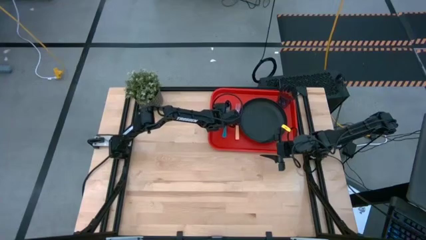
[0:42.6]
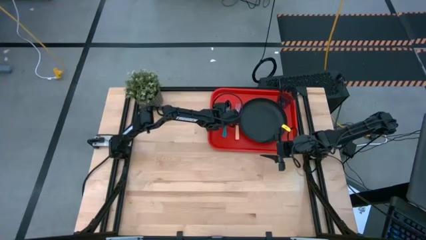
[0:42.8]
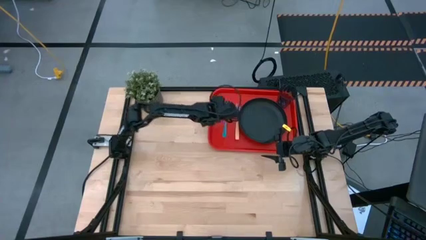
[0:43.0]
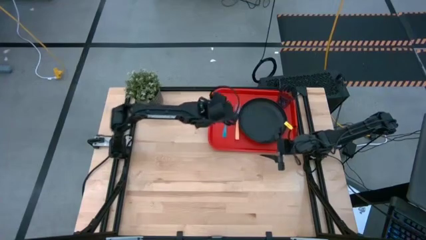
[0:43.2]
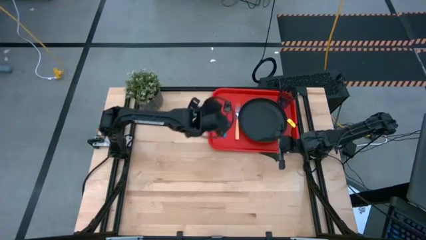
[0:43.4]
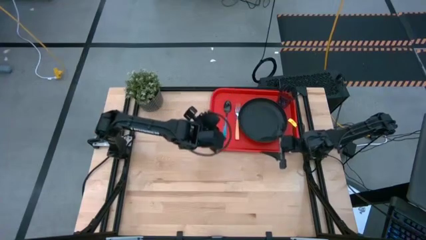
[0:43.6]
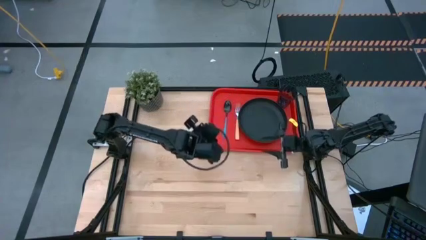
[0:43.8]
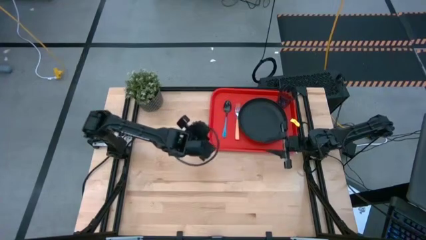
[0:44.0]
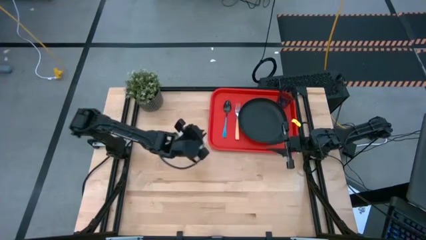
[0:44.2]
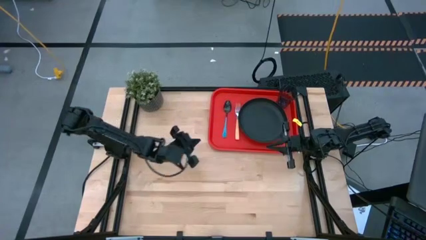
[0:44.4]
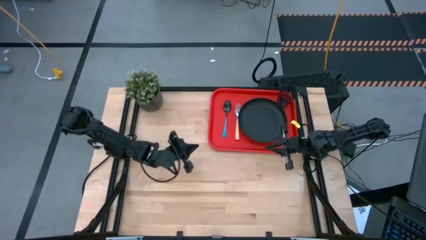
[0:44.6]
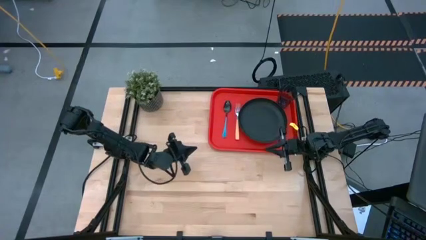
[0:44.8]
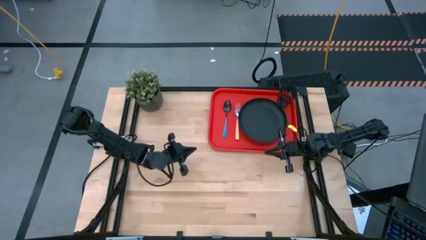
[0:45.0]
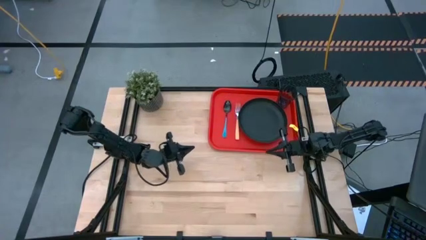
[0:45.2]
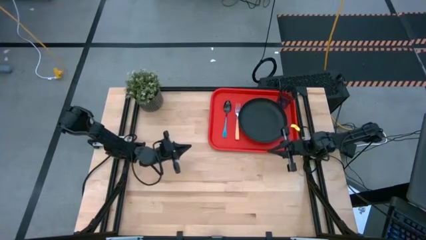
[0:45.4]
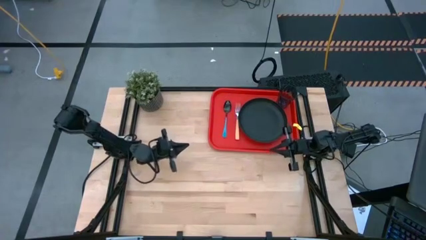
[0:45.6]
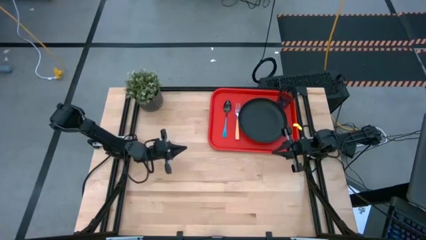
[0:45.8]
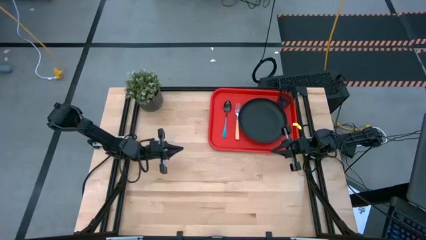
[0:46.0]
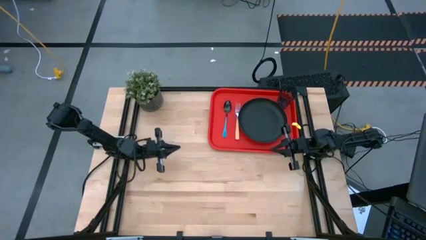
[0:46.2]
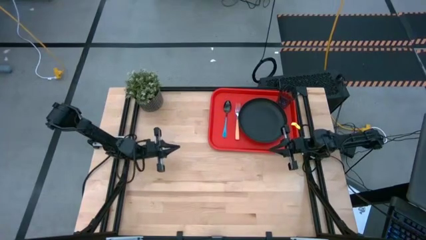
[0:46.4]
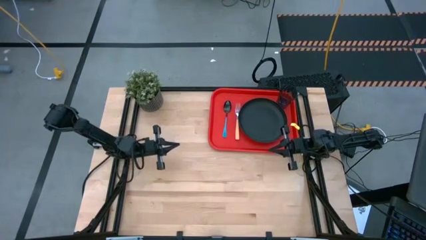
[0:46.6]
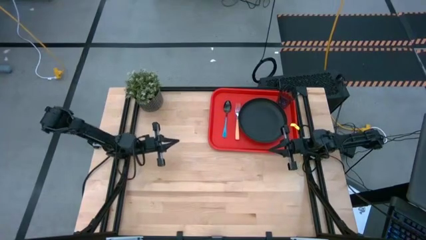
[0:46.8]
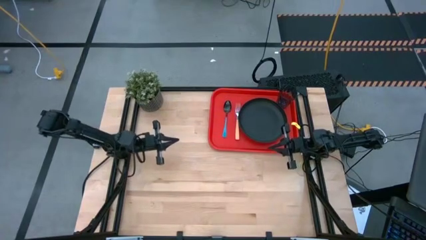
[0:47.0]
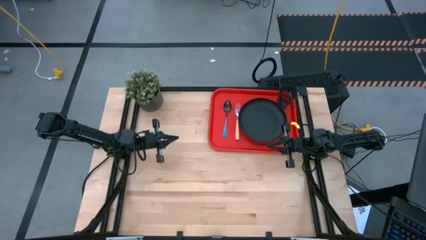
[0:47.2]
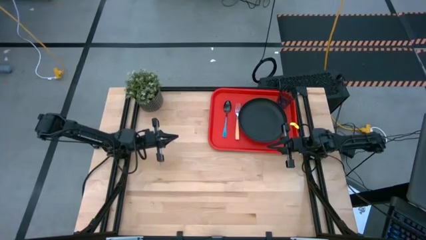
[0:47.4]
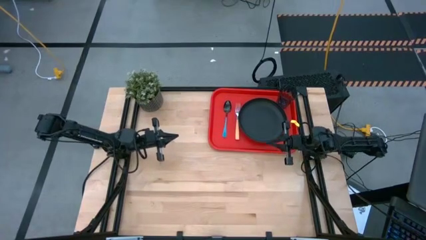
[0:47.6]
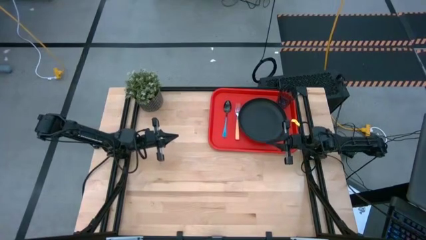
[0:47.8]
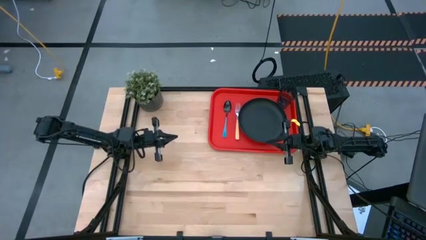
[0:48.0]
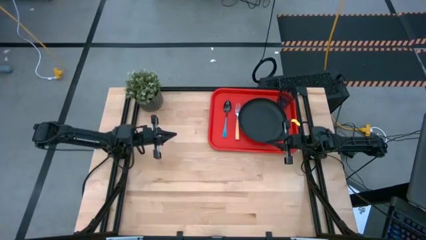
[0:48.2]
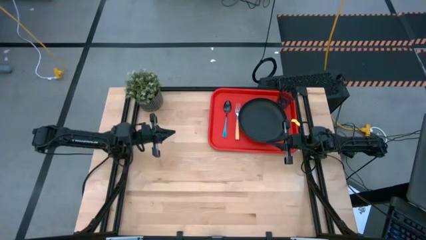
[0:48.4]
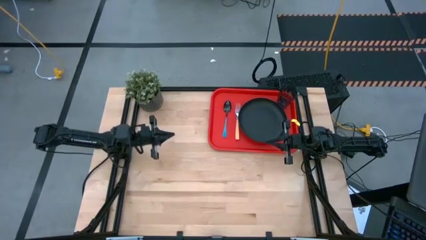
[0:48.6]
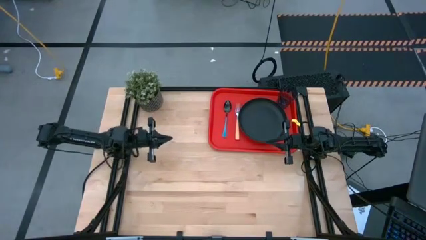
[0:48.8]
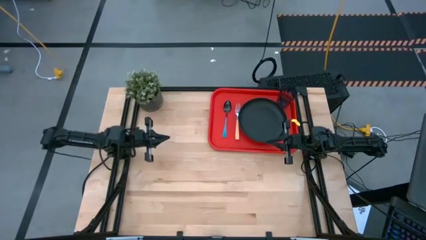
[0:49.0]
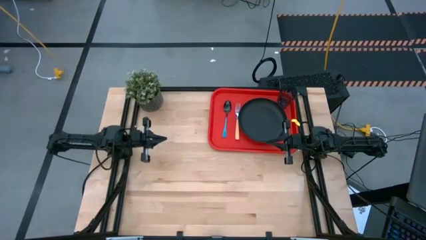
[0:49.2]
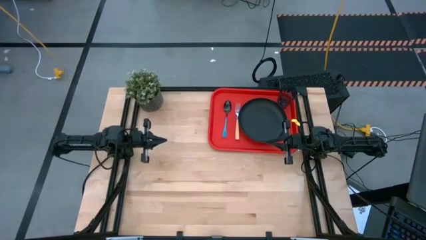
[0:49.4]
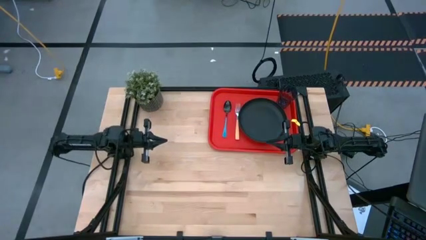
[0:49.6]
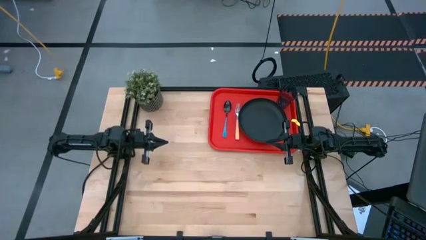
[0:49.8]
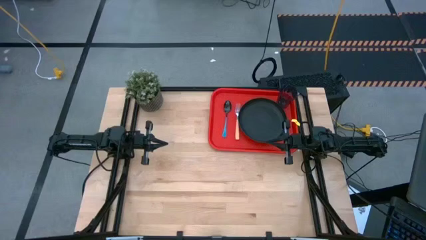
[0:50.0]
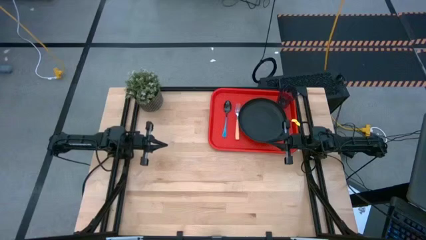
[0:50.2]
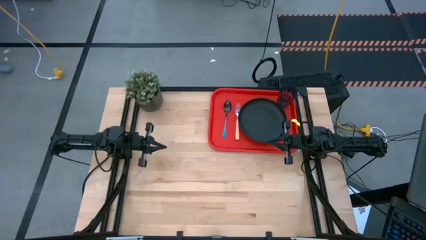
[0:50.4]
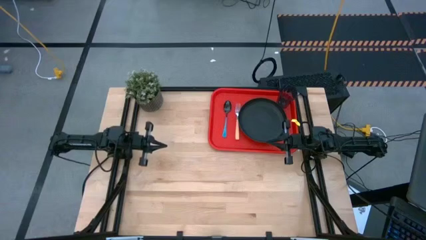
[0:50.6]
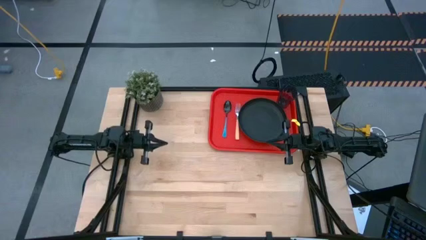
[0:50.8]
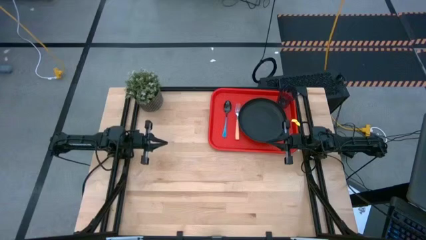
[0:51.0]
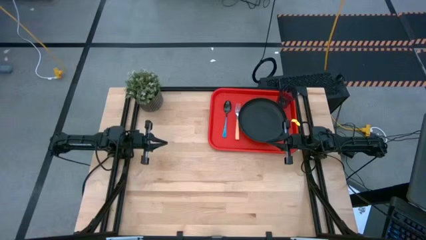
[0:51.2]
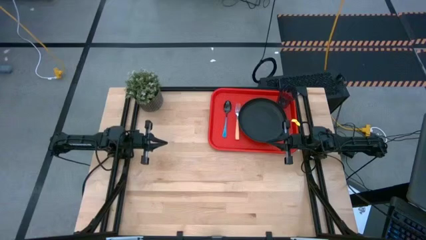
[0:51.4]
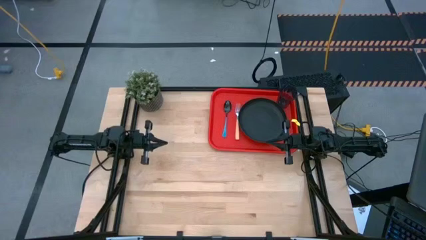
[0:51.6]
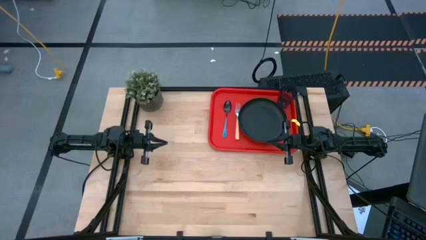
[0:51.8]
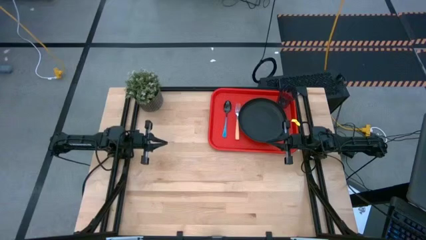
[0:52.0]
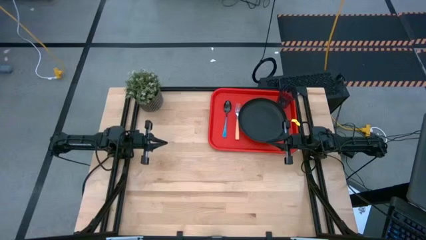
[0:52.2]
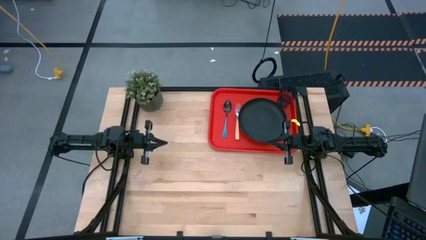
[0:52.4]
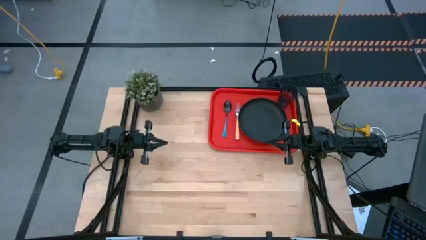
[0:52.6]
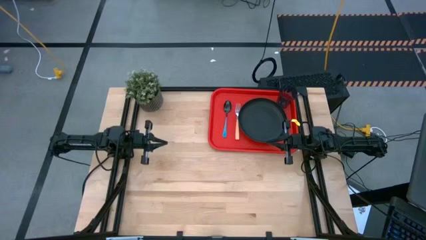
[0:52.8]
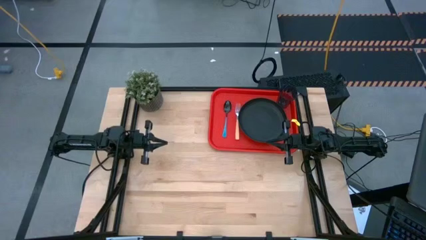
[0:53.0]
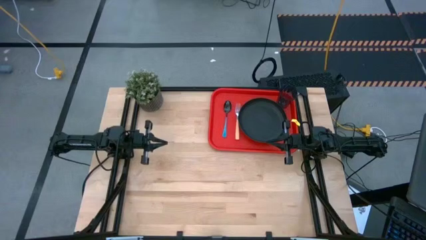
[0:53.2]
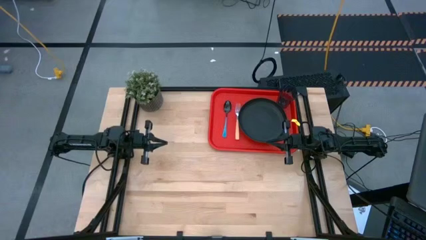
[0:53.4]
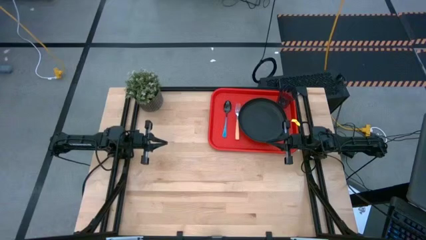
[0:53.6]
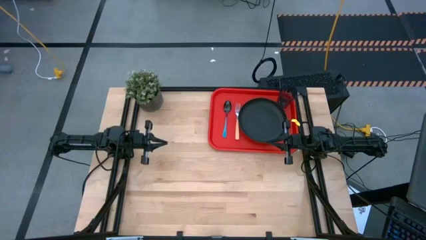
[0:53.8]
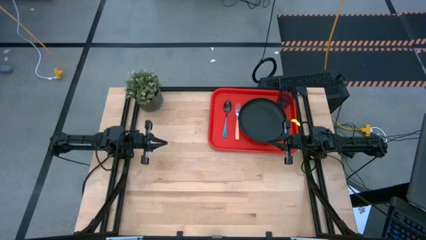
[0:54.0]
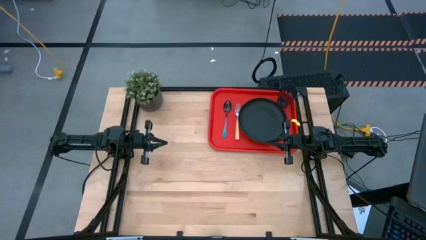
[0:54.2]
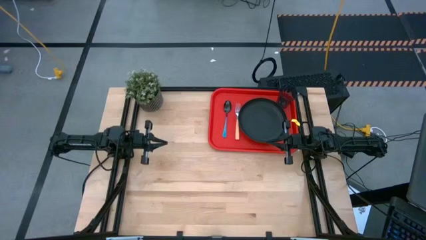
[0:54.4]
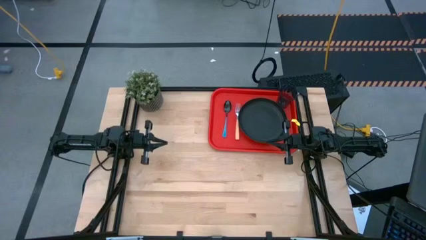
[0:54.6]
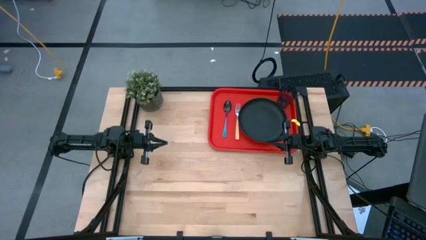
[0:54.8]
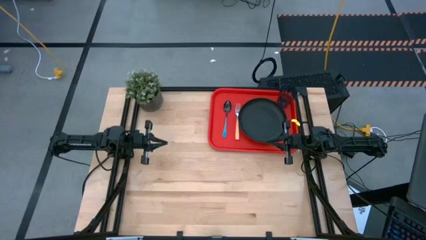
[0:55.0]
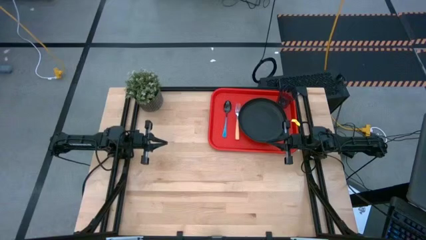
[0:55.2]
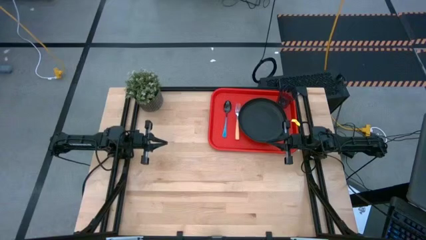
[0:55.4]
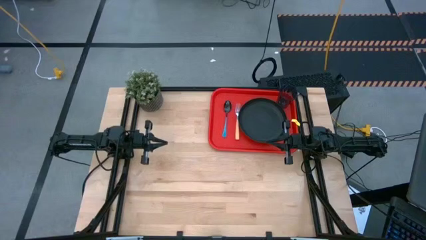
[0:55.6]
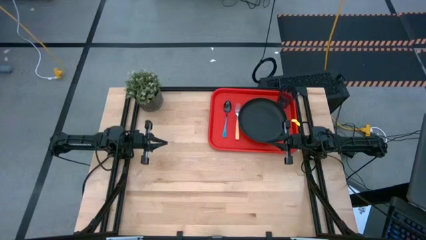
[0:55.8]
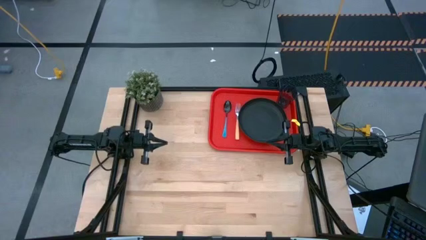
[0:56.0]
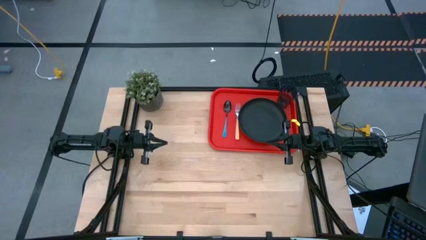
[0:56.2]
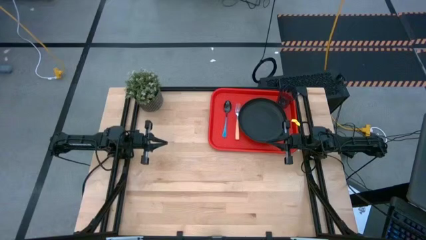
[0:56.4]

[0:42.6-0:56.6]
Task: Pick and place plate/cup/fork/spoon on tray
Return to Home Position
